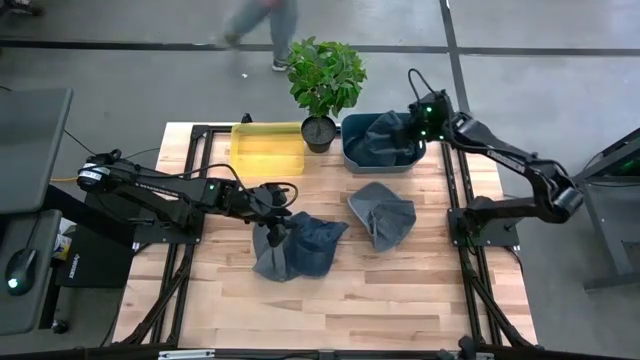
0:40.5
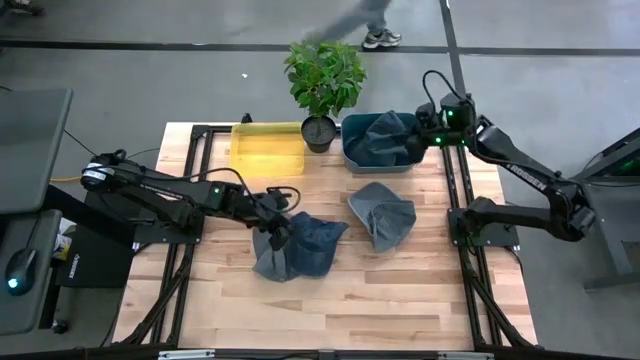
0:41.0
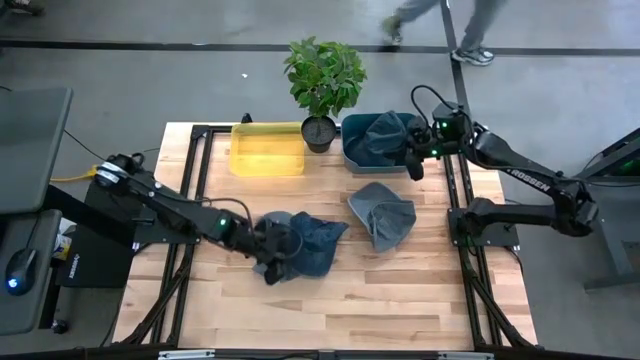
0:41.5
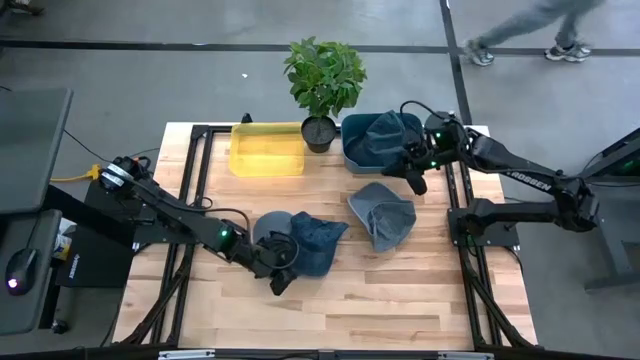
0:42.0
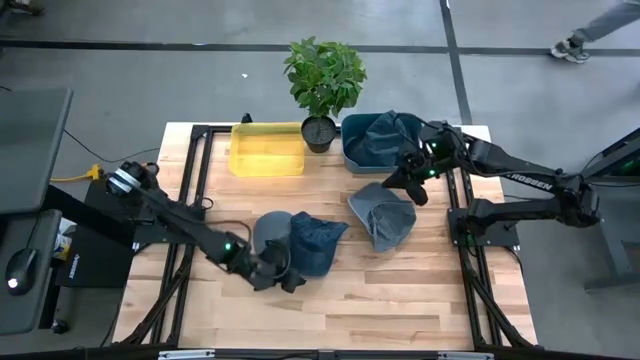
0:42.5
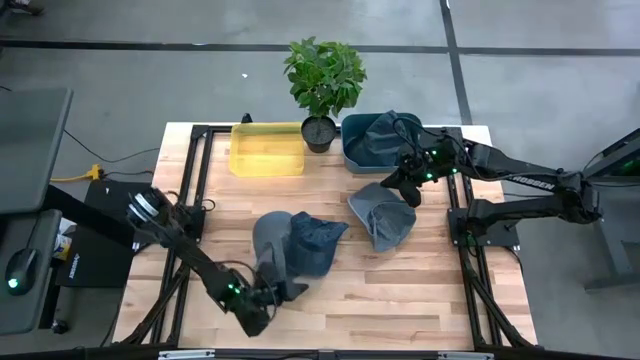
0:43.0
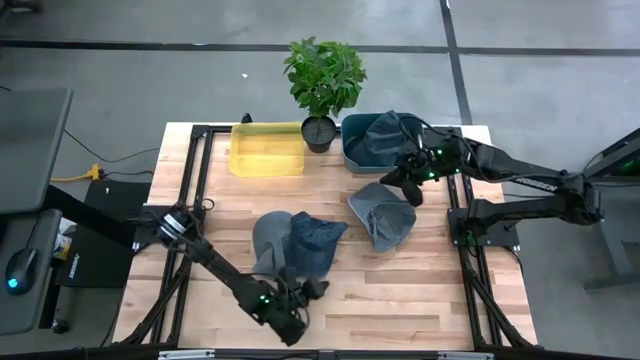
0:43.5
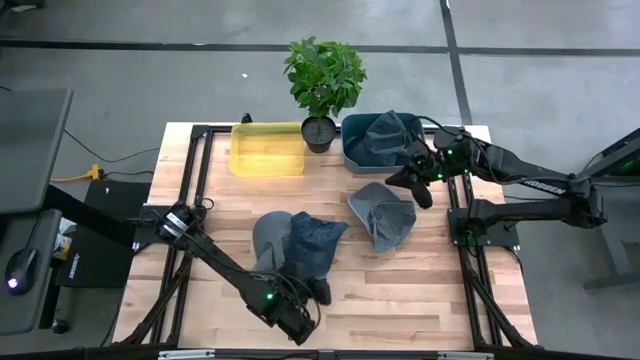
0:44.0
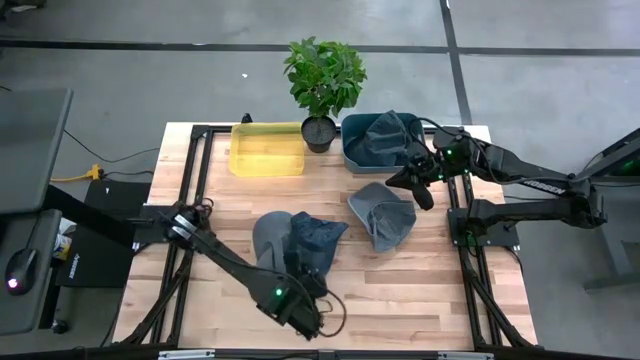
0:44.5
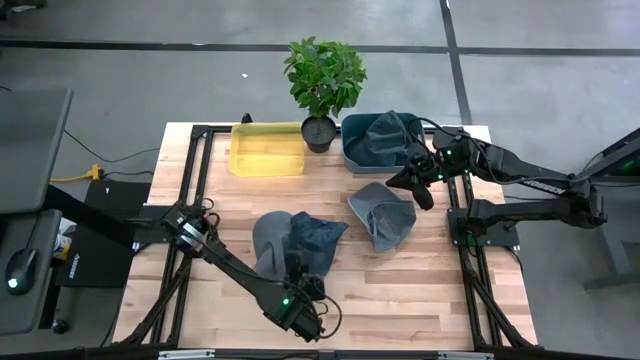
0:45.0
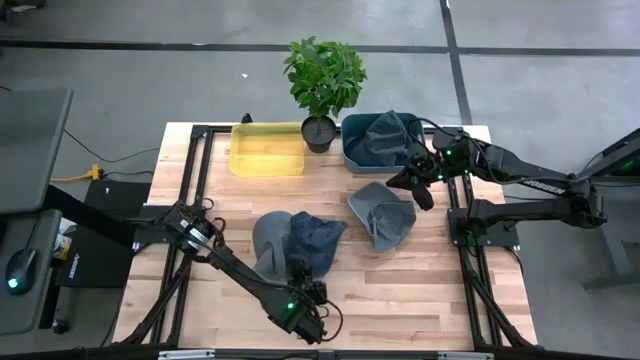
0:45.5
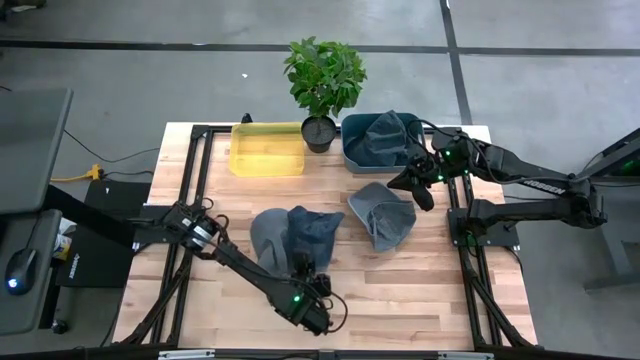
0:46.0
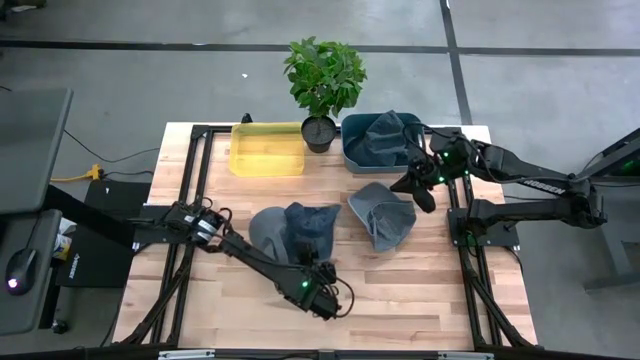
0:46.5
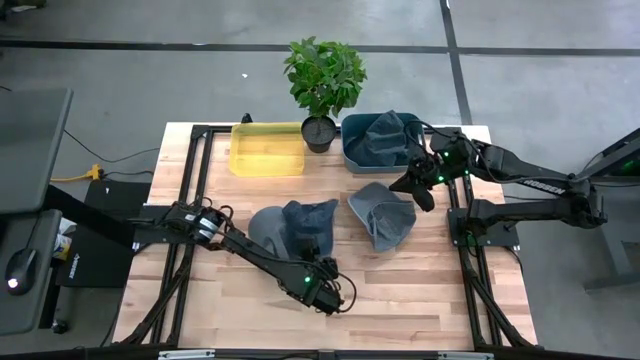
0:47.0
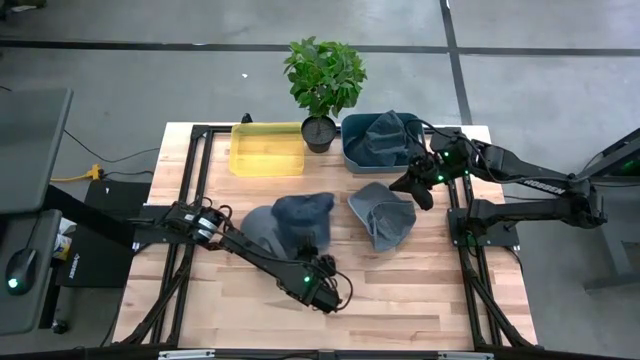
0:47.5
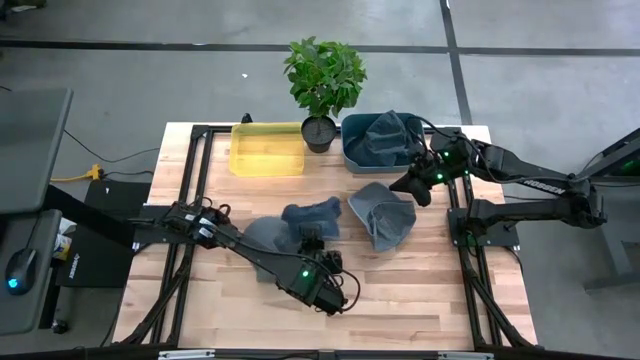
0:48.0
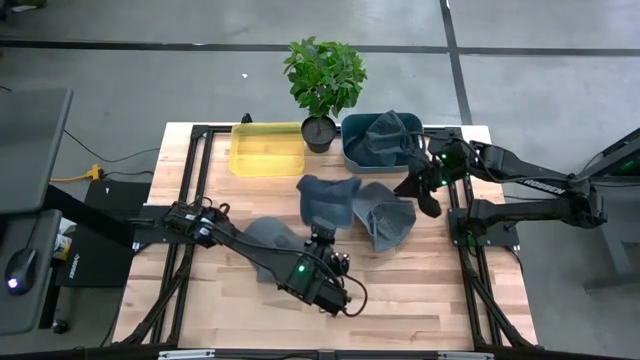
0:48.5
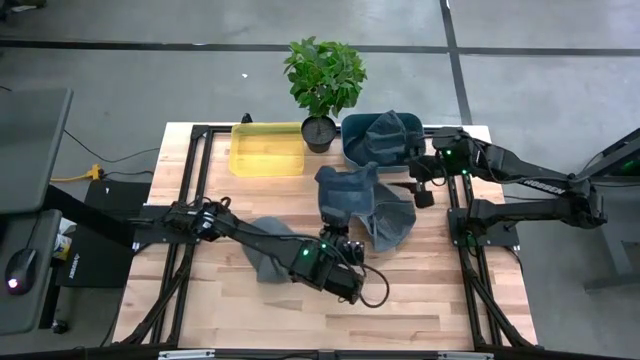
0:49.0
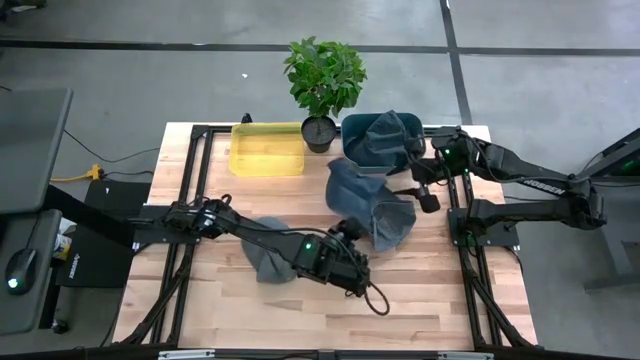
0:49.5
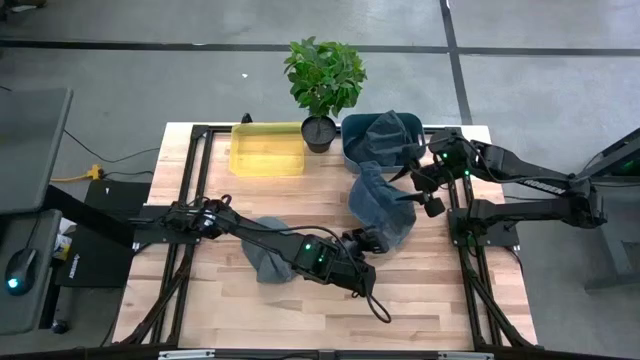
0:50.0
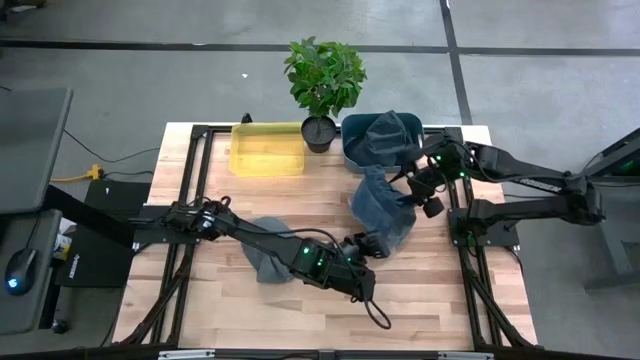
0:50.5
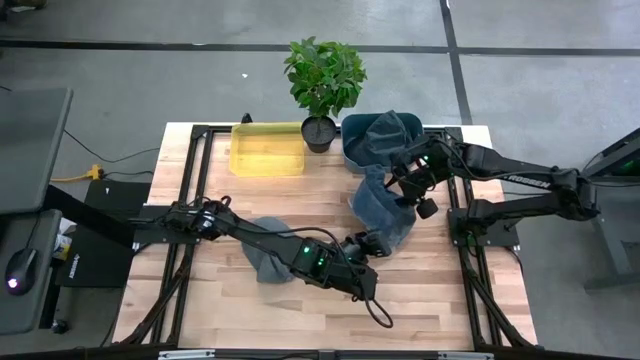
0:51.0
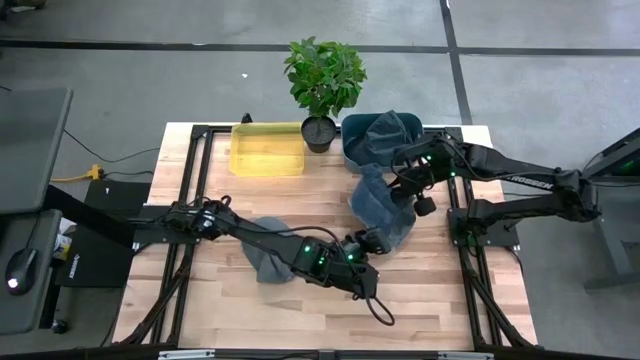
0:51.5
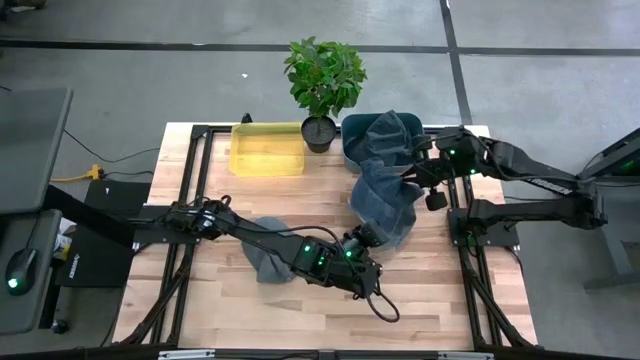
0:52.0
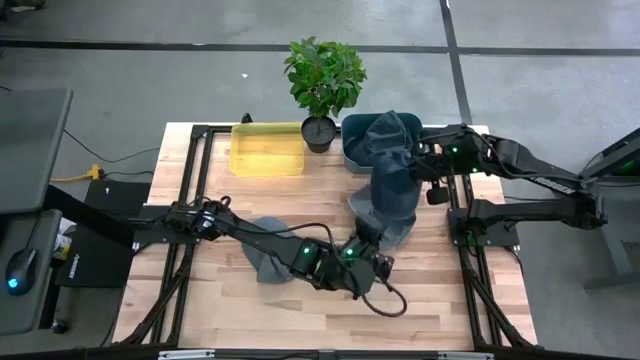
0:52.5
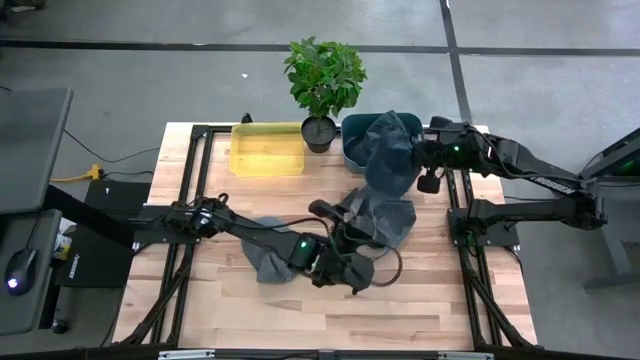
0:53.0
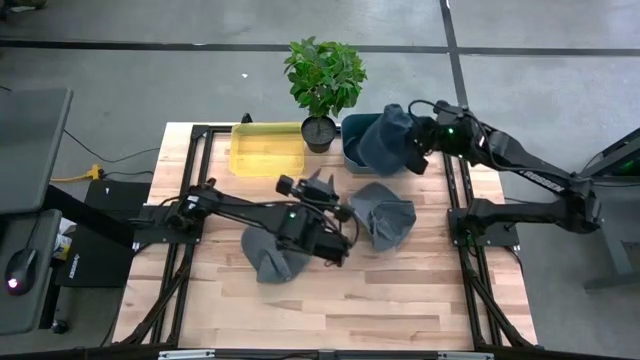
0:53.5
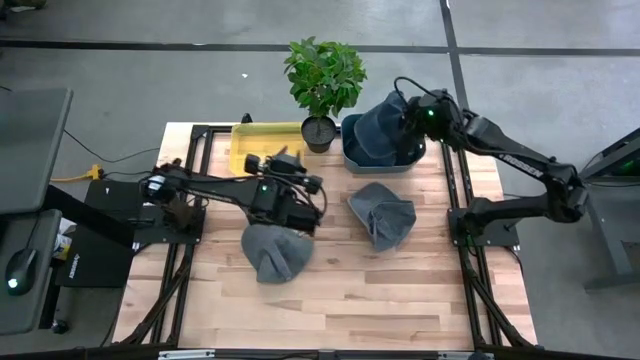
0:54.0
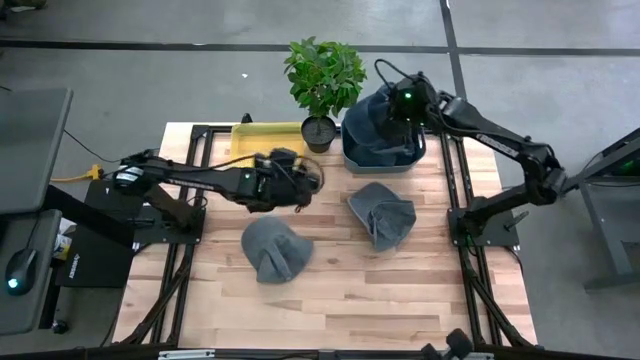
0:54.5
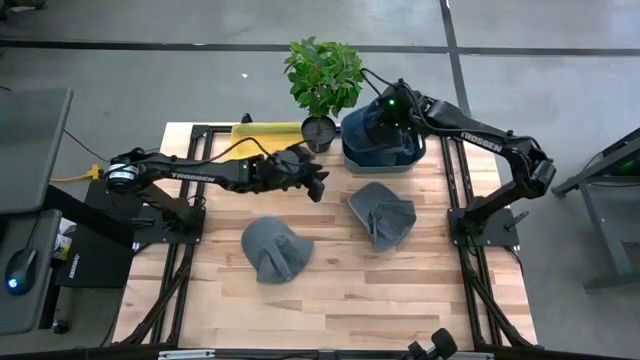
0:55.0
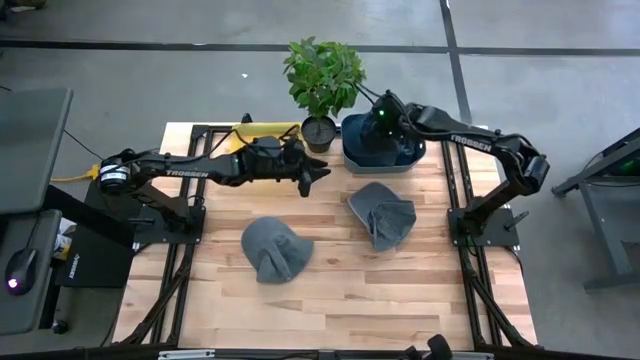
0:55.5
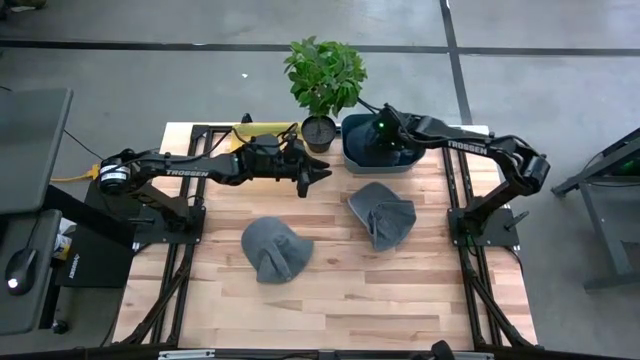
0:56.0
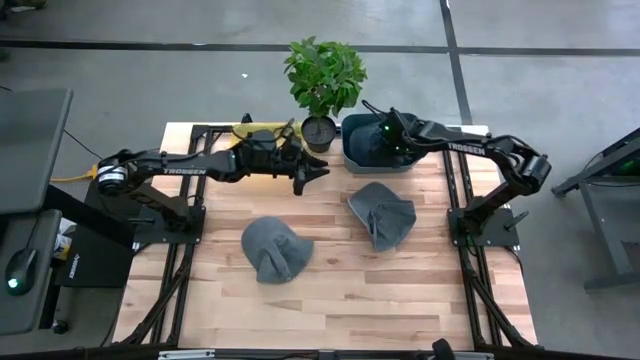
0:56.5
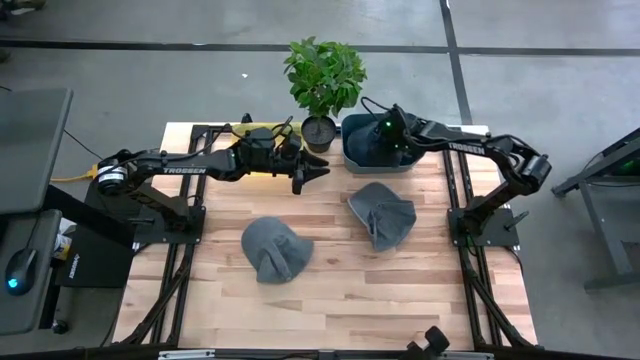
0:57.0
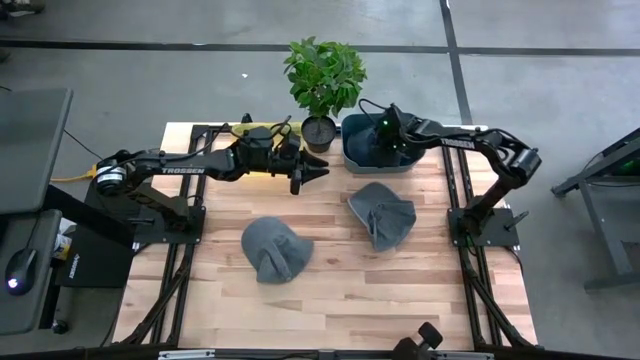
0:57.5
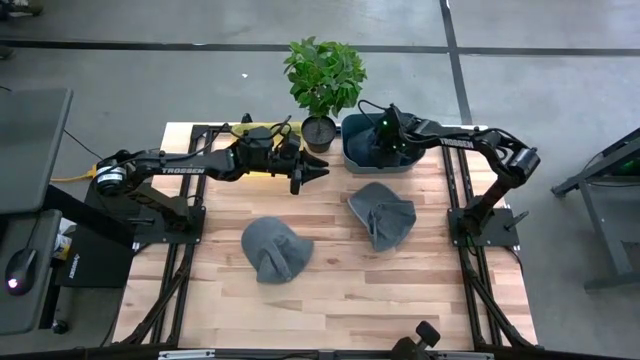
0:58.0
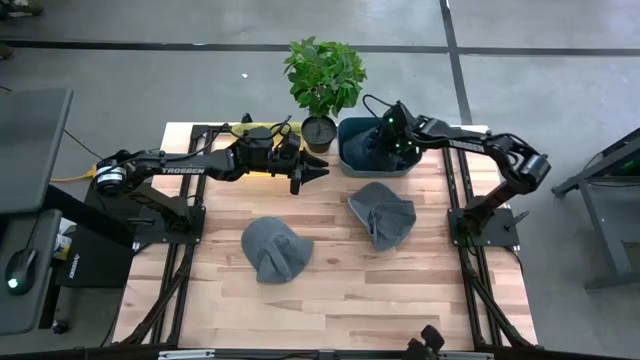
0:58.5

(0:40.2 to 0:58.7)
Task: Pick & Place hat
Put the blue cap into the blue bin
